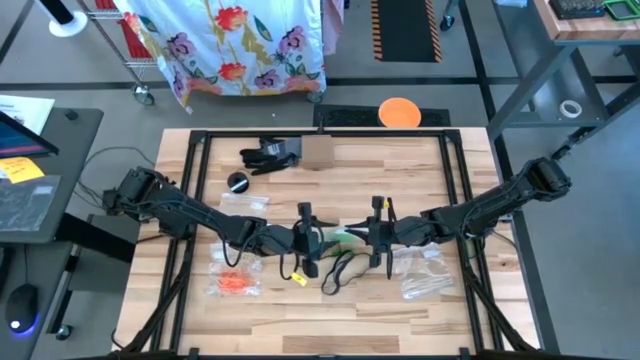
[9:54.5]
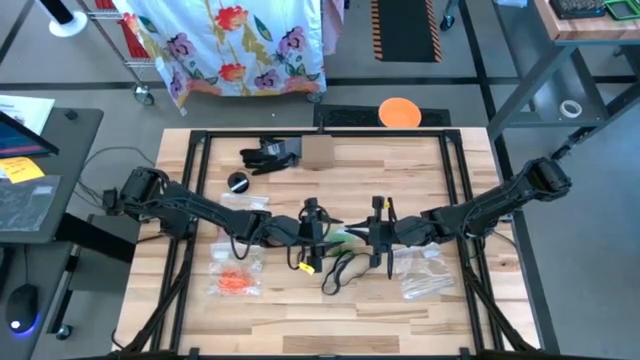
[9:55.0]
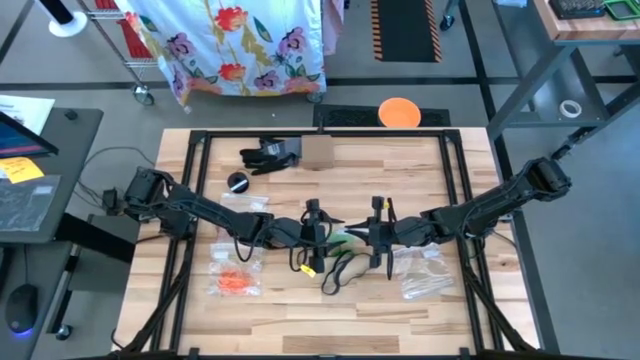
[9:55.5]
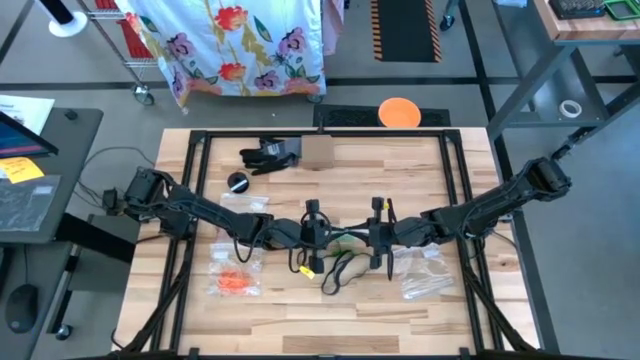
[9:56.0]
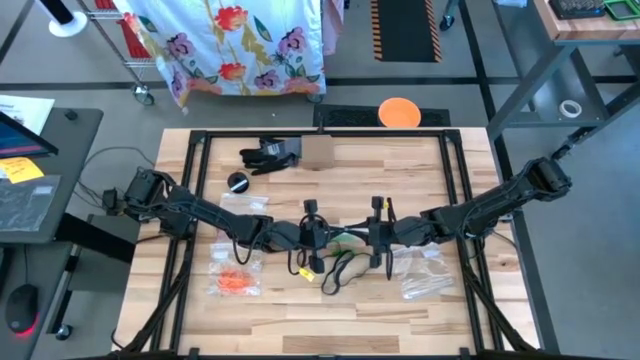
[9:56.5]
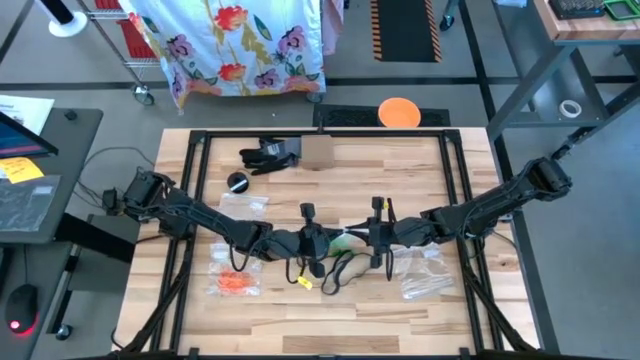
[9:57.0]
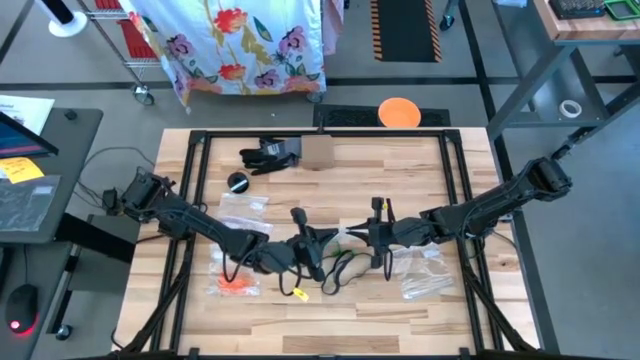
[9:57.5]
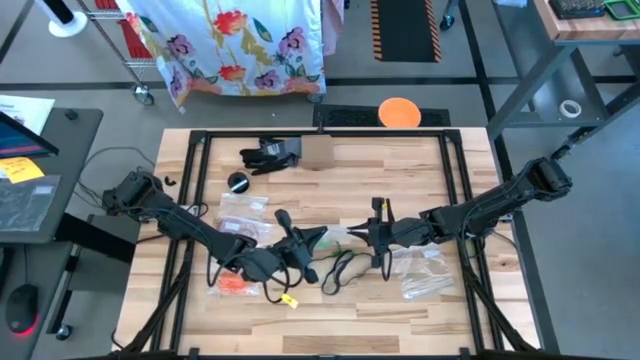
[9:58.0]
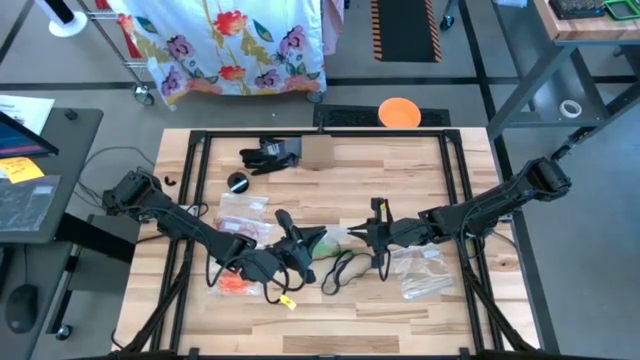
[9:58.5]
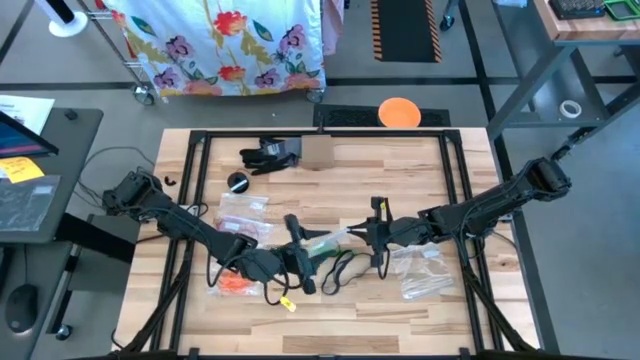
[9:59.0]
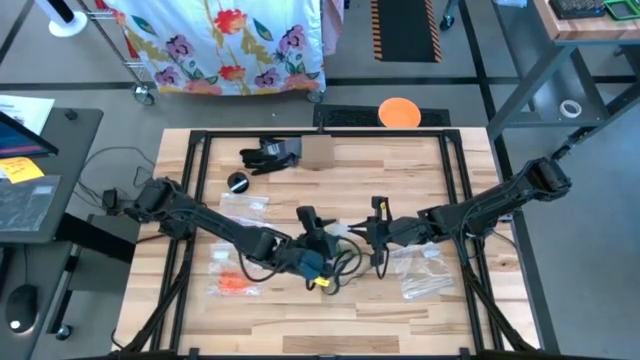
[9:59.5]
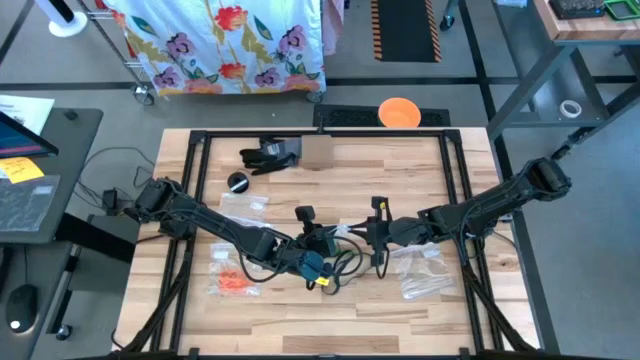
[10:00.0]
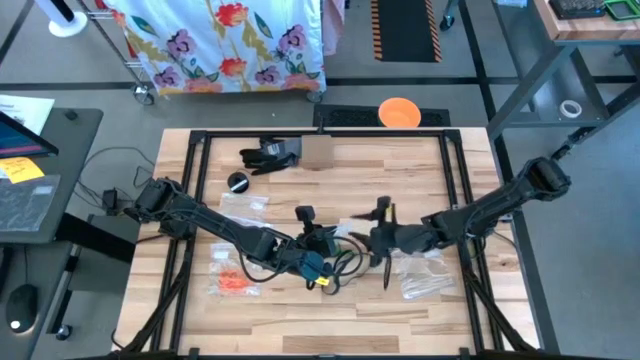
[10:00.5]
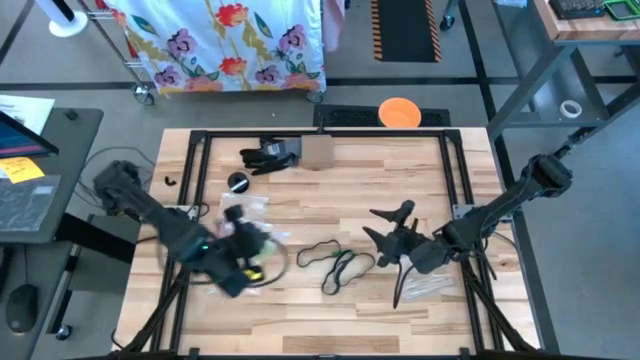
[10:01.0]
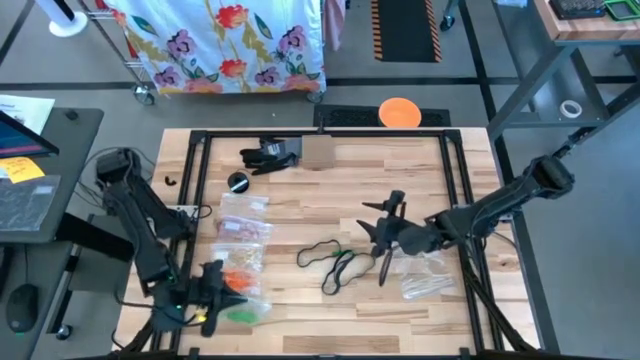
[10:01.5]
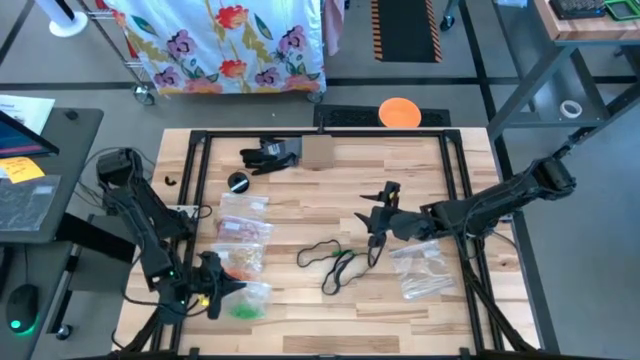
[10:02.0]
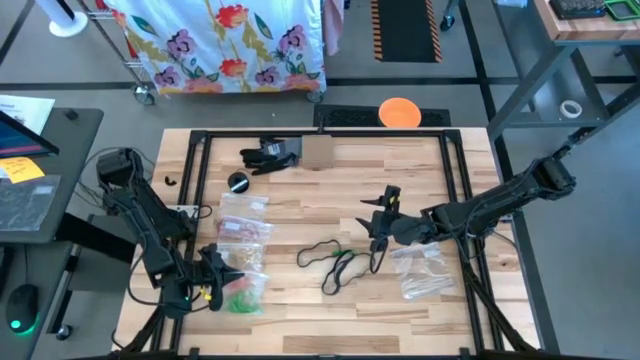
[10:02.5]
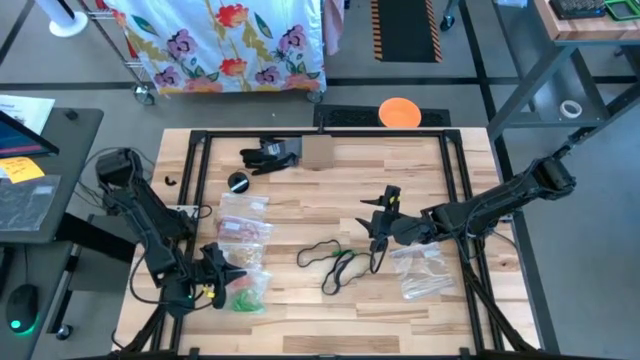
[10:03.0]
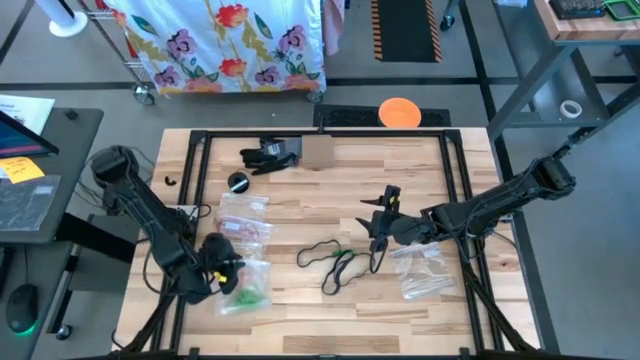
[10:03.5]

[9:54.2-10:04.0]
Task: Sort rubber bands
Close the transparent zip bag

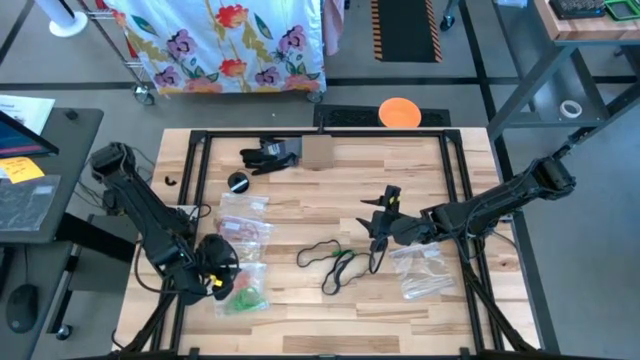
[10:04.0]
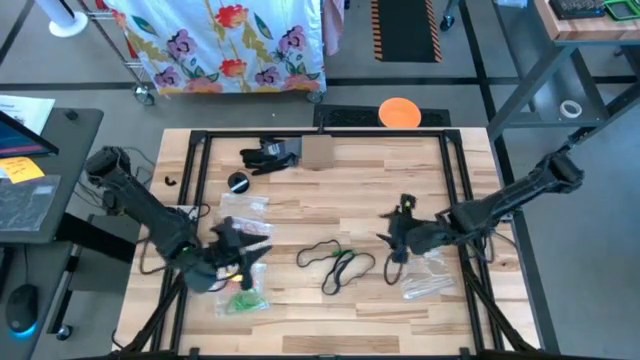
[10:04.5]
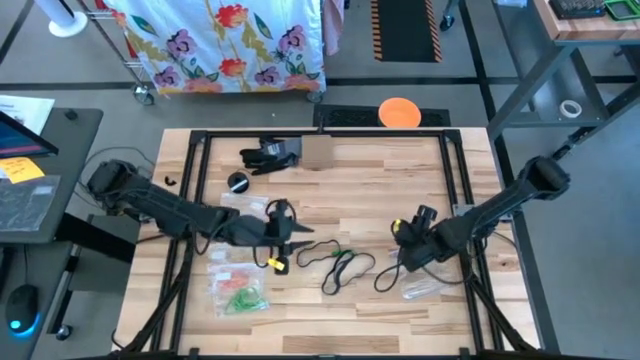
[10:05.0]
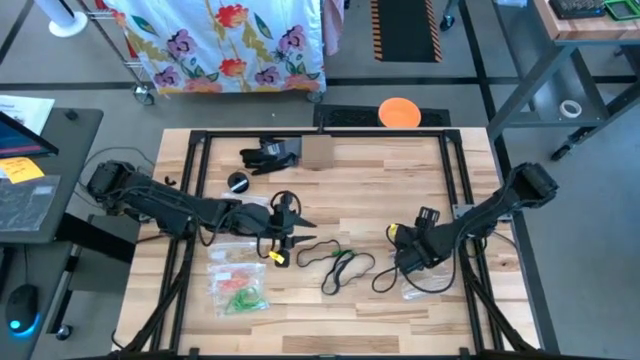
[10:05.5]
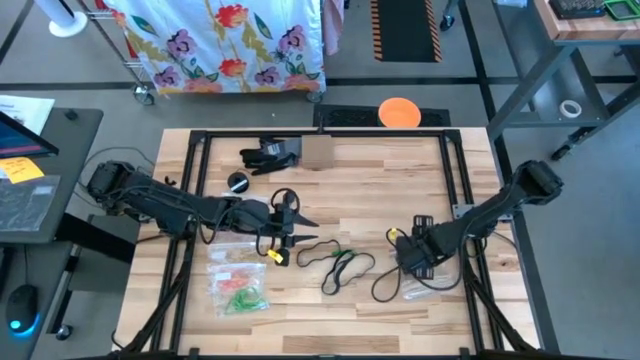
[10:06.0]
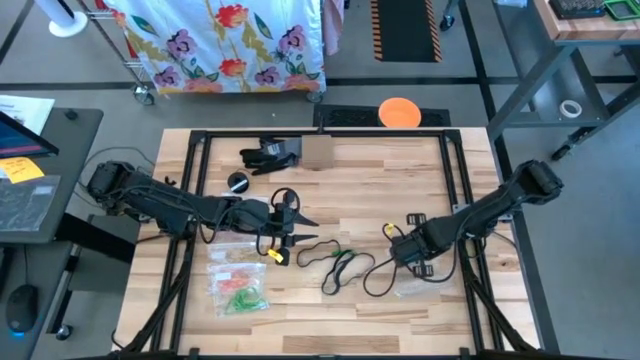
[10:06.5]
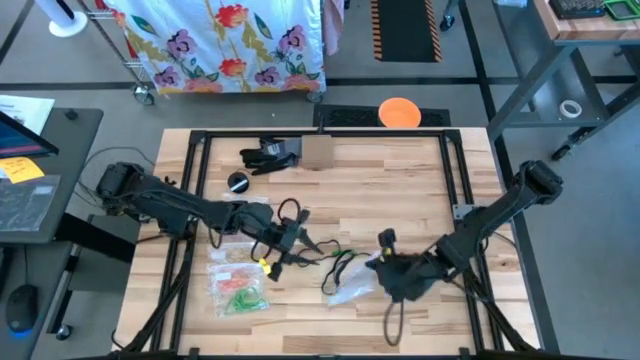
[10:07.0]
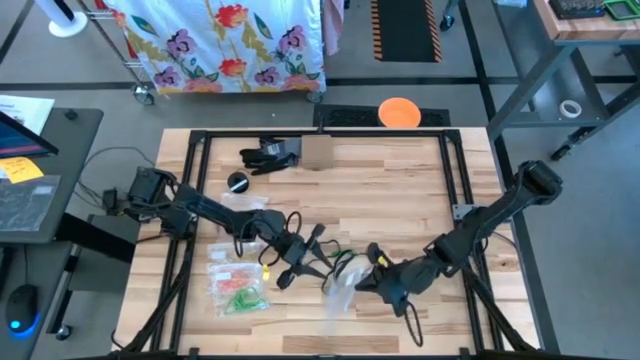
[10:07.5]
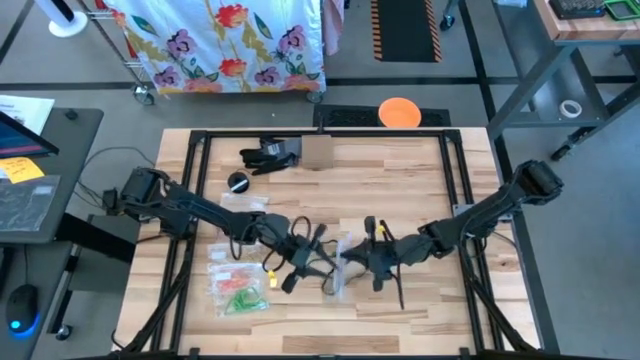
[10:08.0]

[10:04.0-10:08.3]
Open the transparent zip bag

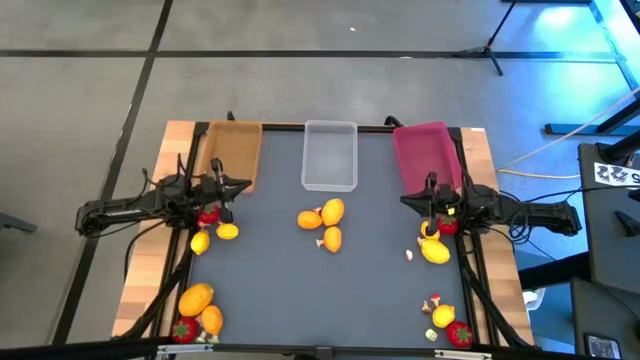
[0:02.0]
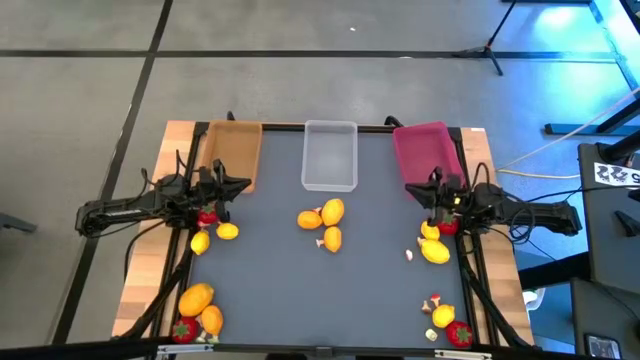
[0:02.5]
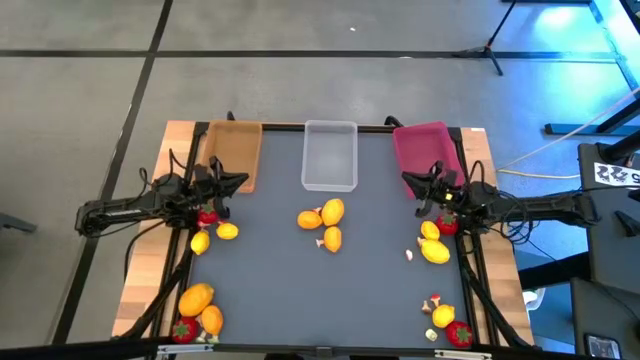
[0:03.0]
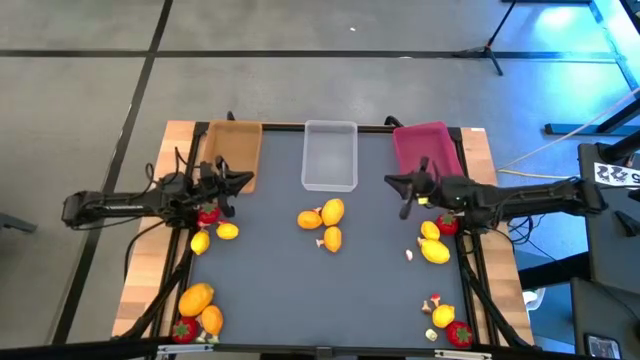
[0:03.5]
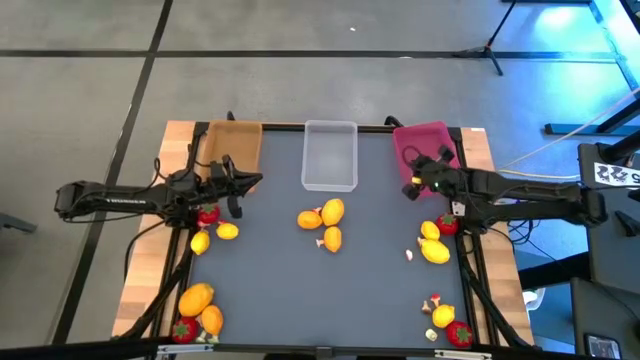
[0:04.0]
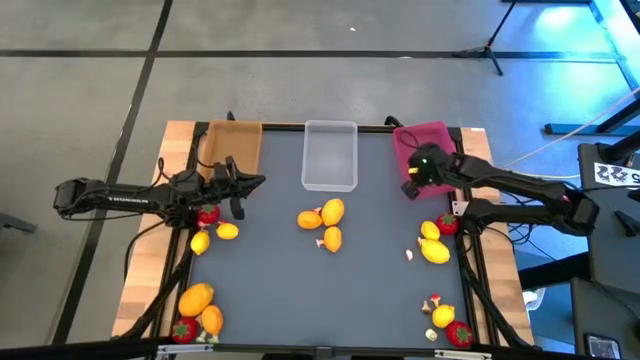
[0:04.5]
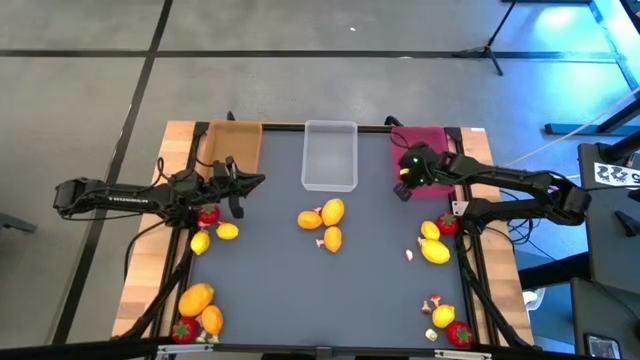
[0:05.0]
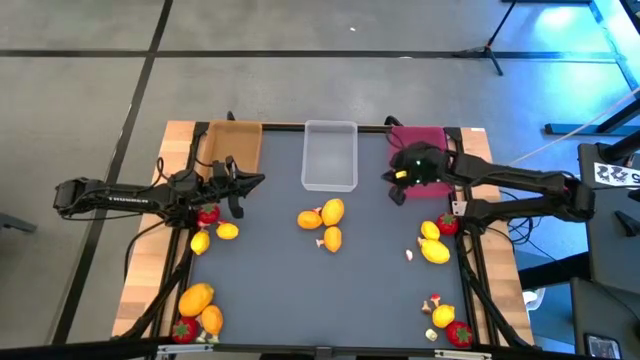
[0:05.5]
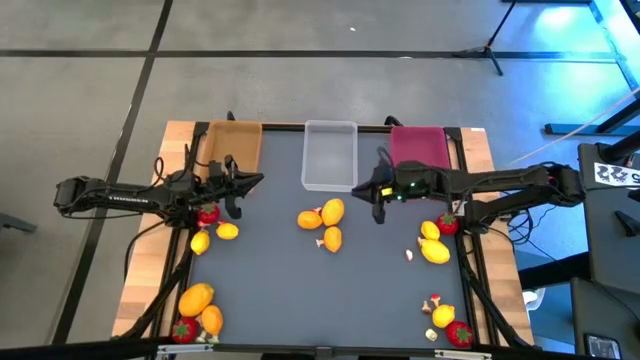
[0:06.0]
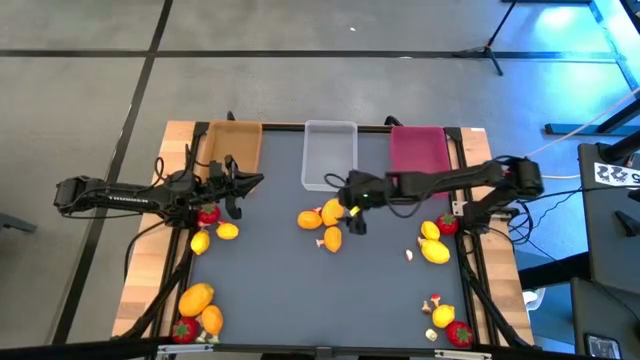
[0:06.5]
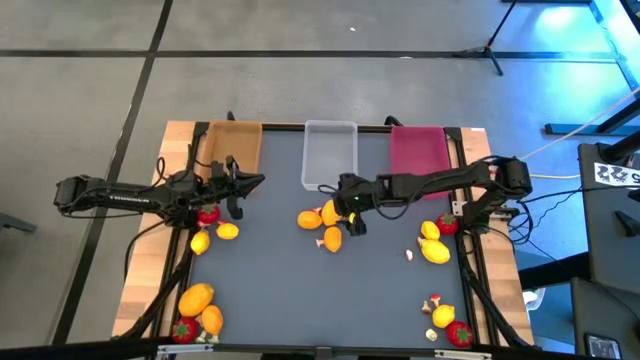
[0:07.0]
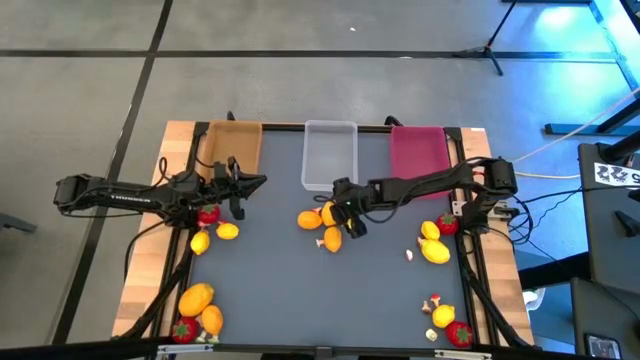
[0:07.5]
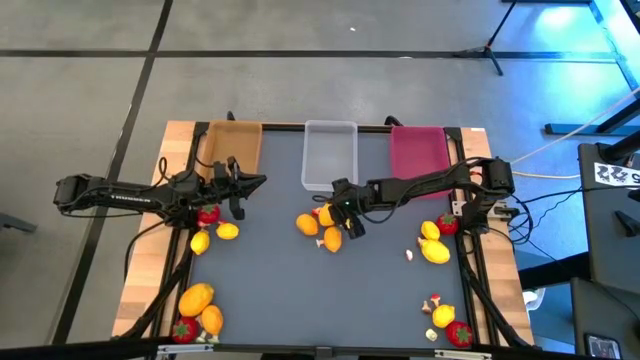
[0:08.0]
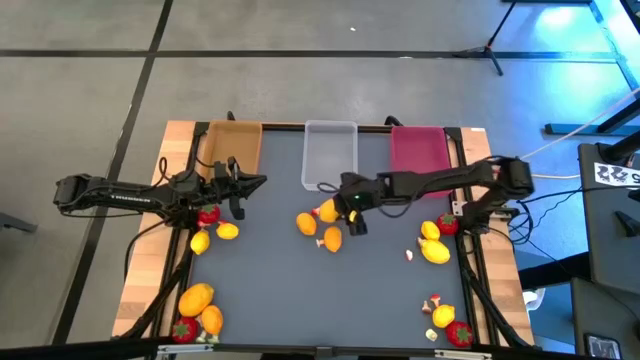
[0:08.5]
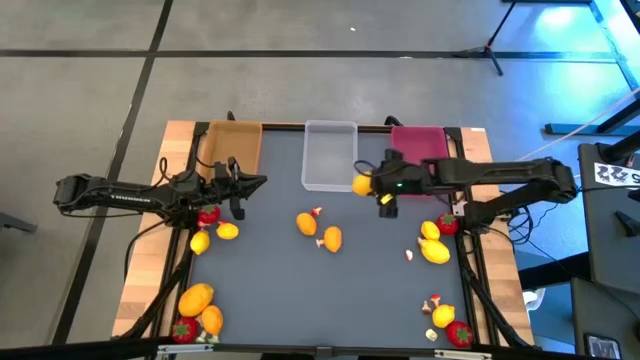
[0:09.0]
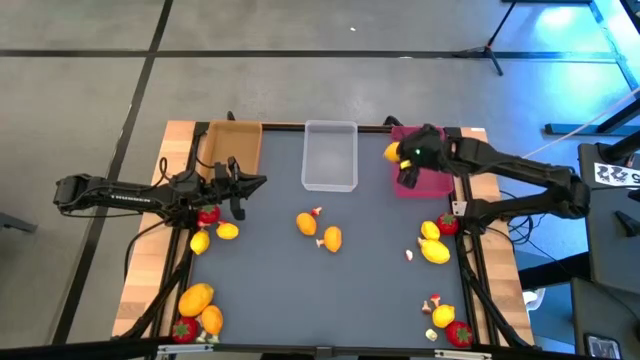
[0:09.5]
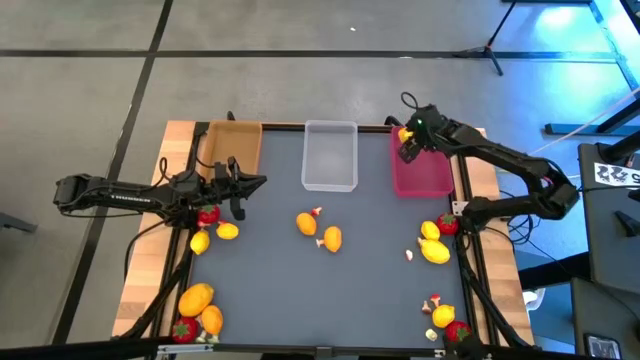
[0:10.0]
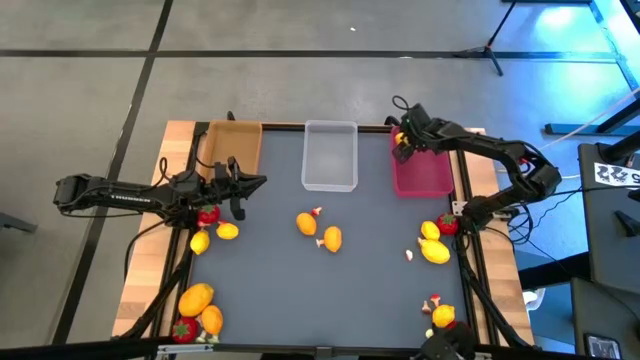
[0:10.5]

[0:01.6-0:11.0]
Task: Sort produce into baskets
Put the lemon into the pink bin
